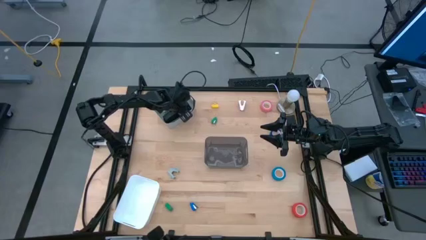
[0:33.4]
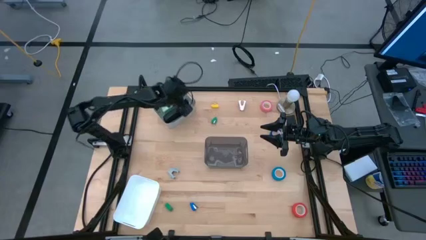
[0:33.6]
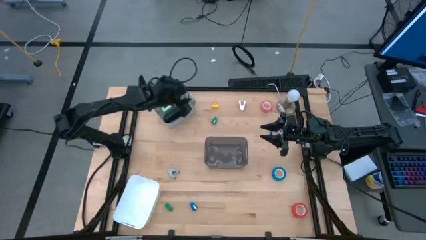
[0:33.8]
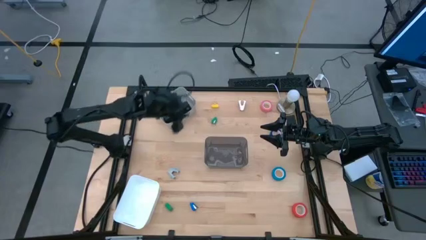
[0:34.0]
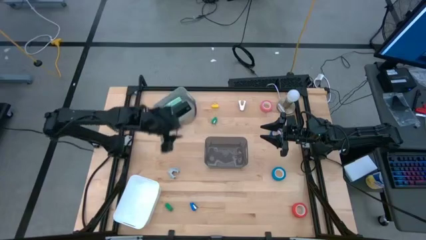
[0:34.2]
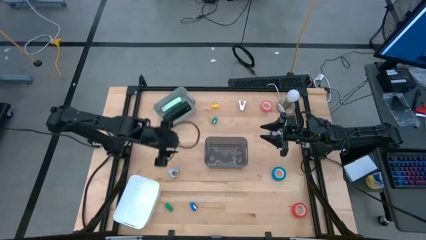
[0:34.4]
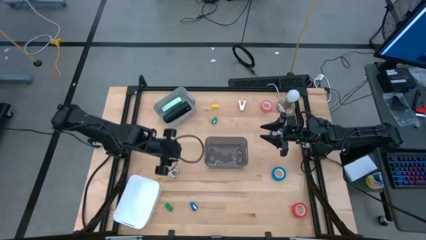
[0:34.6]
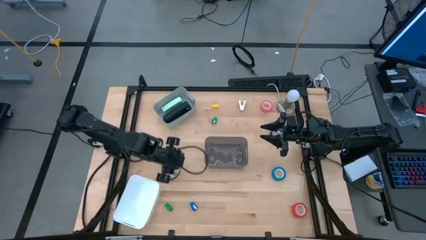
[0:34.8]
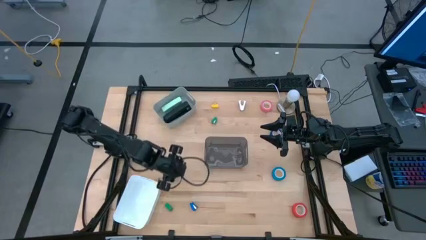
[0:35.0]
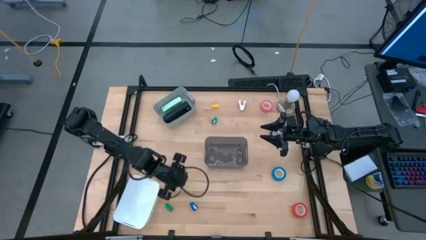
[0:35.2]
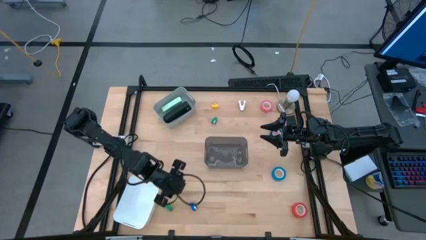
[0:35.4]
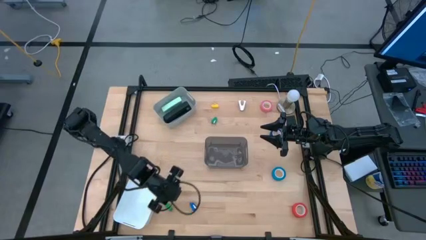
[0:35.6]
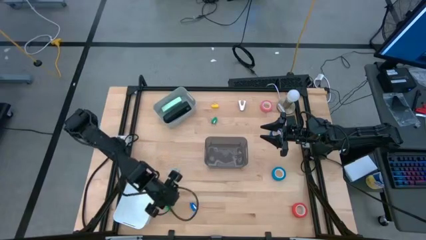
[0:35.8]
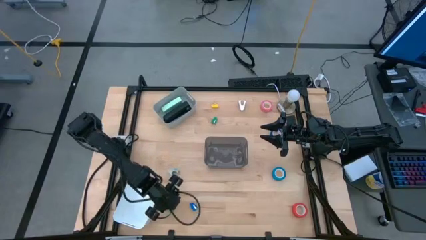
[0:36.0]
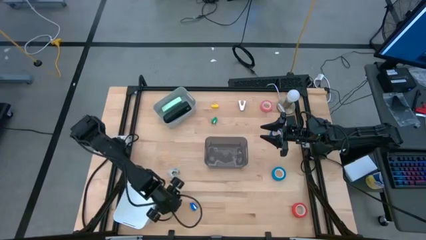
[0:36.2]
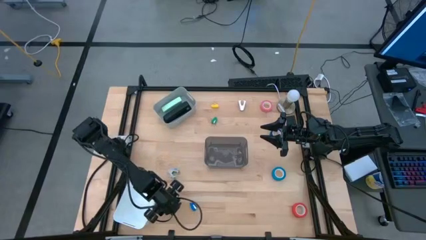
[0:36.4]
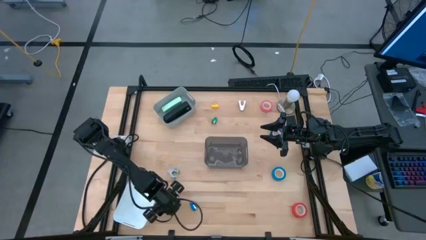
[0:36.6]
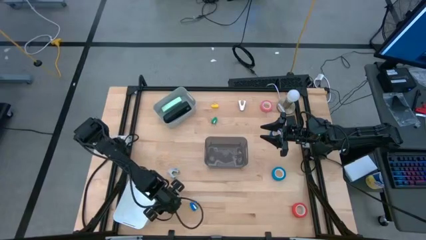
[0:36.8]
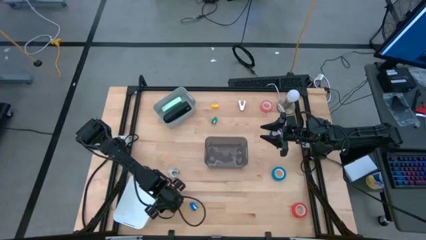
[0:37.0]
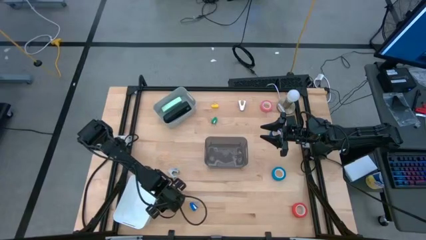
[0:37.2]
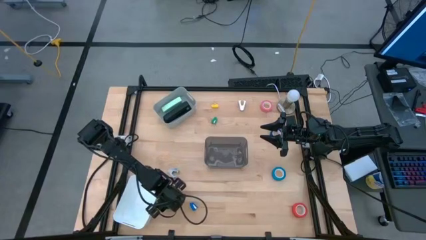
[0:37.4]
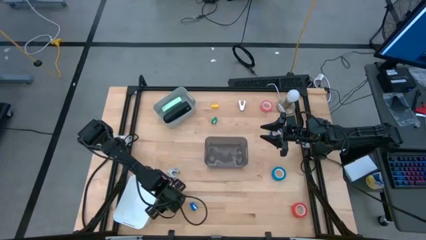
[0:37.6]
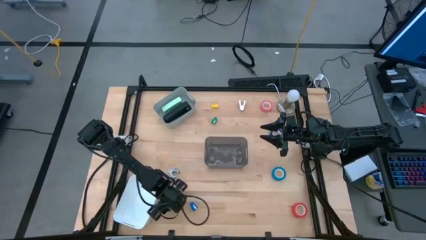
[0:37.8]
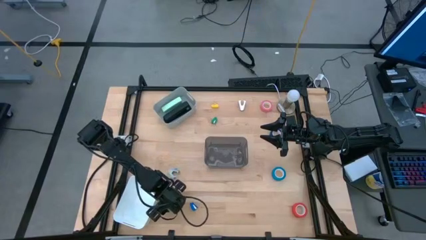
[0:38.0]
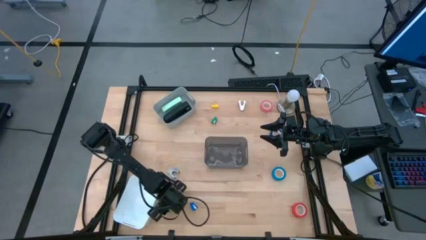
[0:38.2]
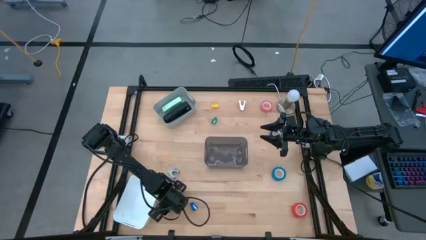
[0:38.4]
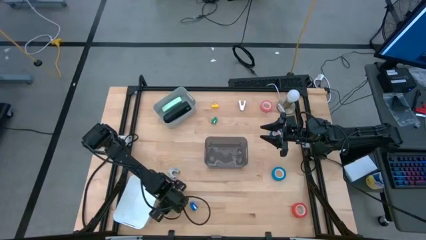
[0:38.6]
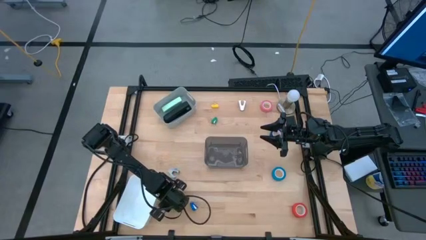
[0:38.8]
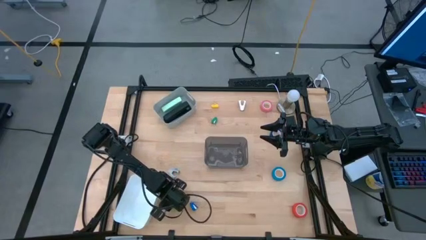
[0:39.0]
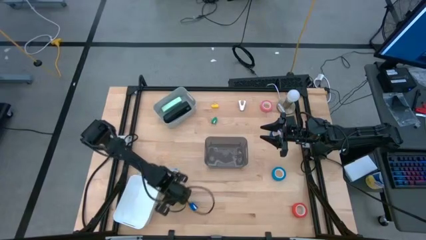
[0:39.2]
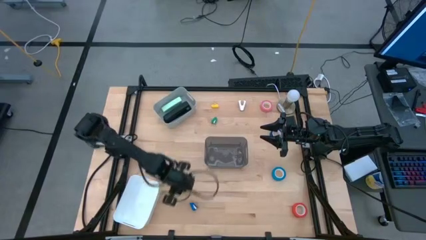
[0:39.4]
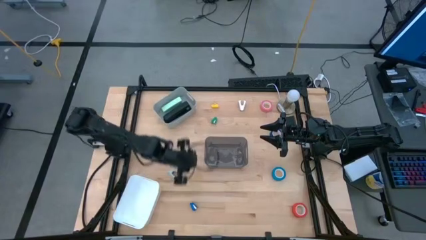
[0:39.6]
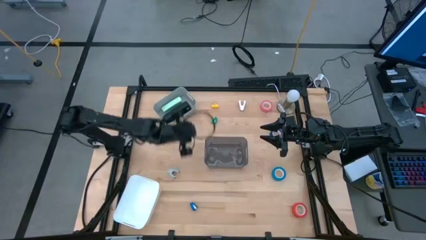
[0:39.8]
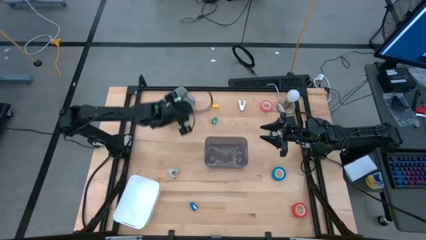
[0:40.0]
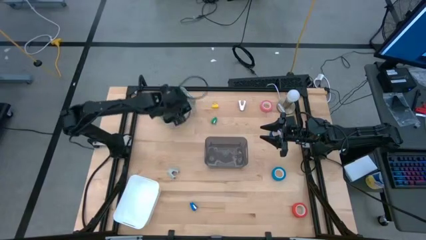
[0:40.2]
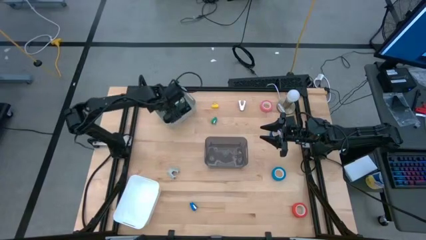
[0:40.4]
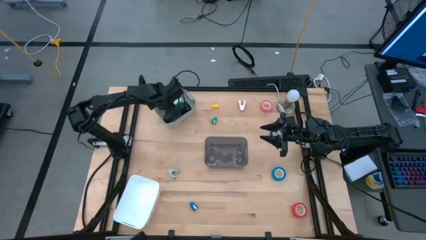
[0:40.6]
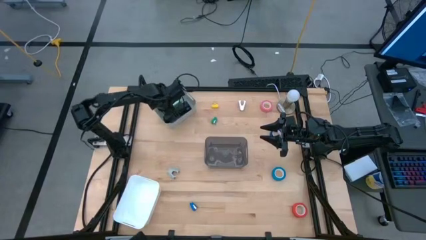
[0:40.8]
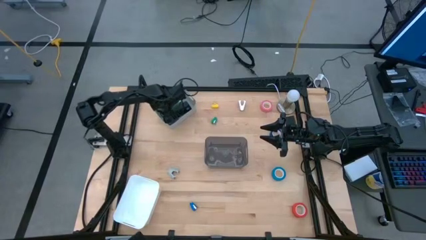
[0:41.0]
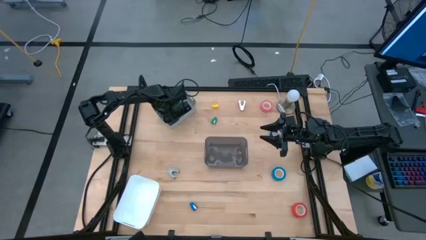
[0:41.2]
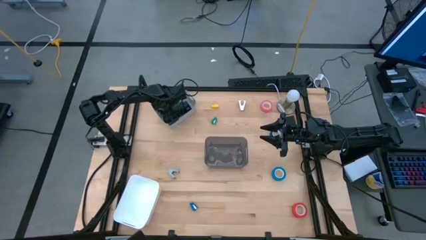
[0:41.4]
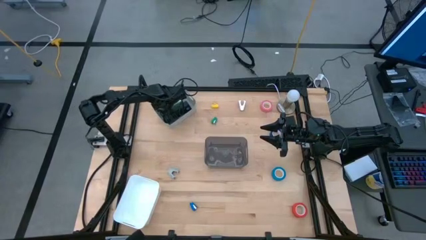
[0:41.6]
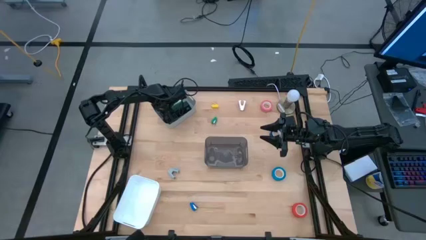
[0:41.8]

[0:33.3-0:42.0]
Task: Pick and place Stapler, Stapler remover, tape
Put the bottom green stapler into the gray bin

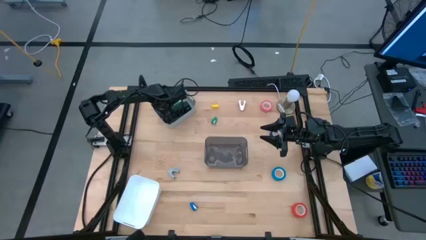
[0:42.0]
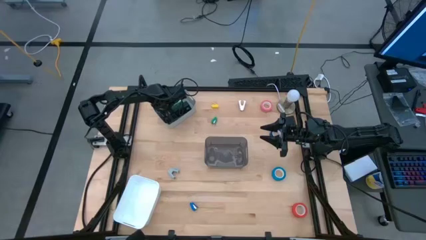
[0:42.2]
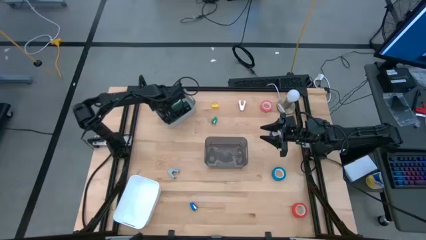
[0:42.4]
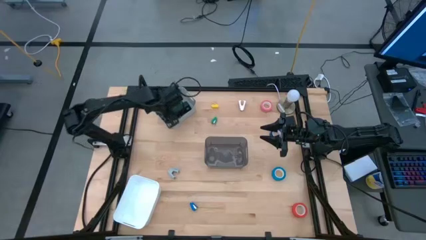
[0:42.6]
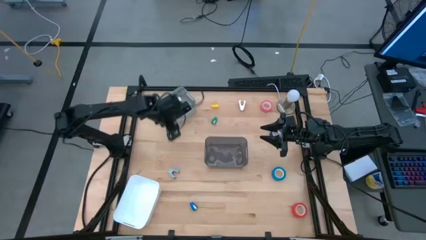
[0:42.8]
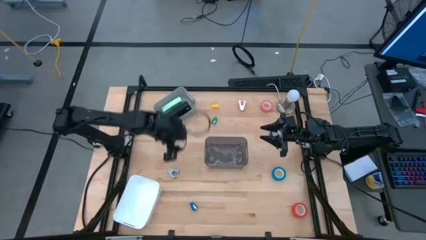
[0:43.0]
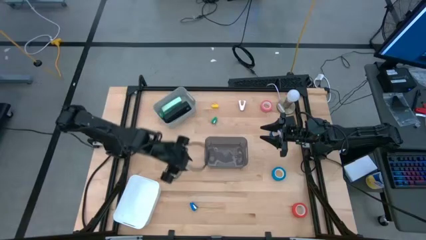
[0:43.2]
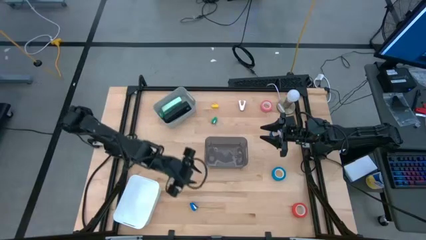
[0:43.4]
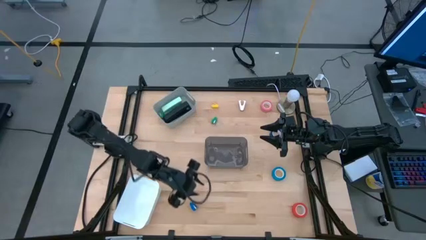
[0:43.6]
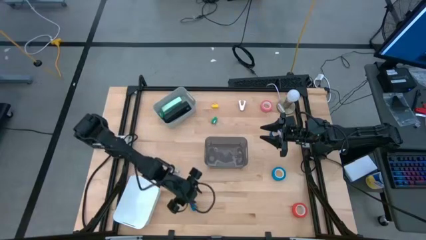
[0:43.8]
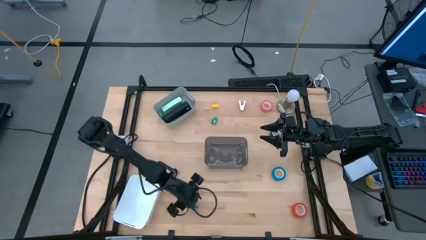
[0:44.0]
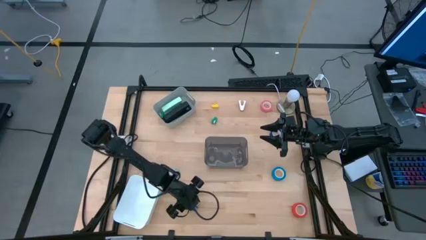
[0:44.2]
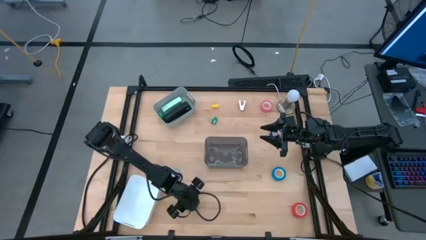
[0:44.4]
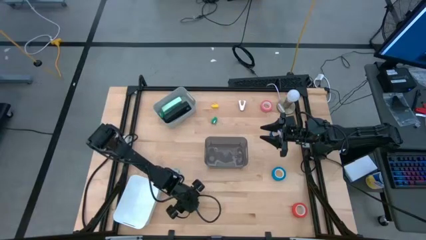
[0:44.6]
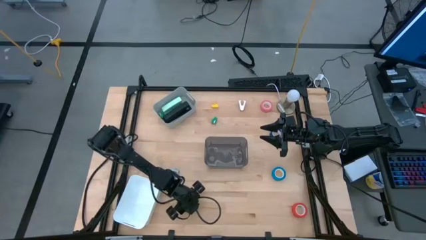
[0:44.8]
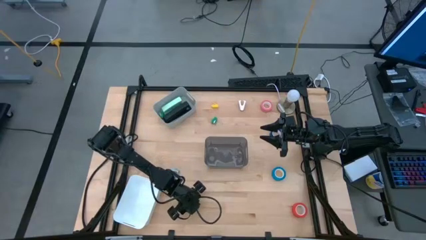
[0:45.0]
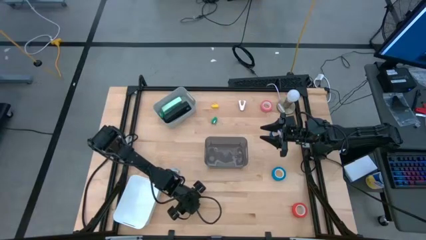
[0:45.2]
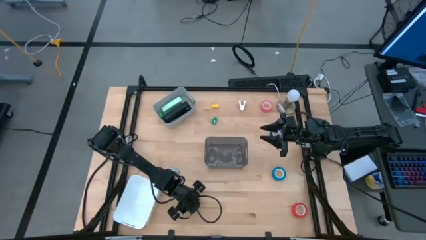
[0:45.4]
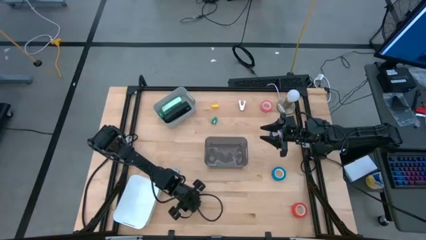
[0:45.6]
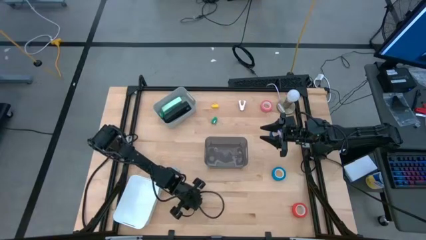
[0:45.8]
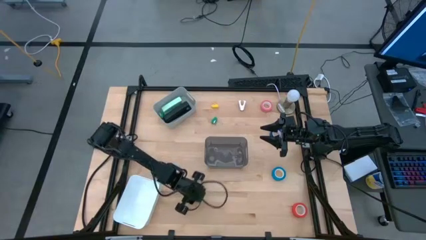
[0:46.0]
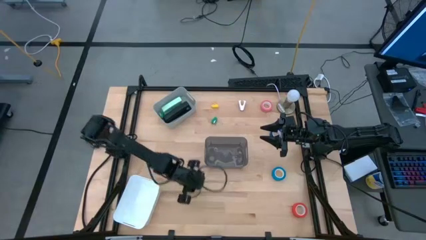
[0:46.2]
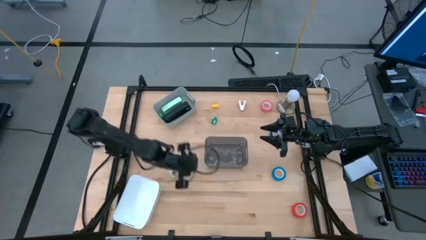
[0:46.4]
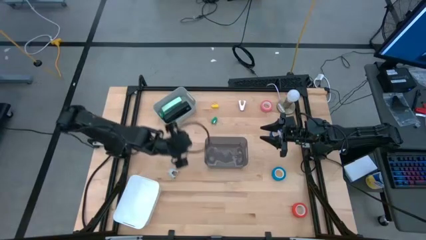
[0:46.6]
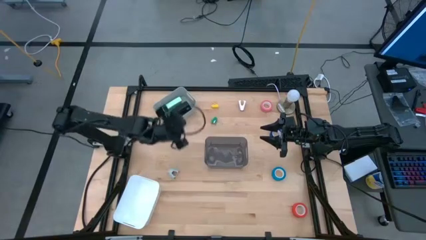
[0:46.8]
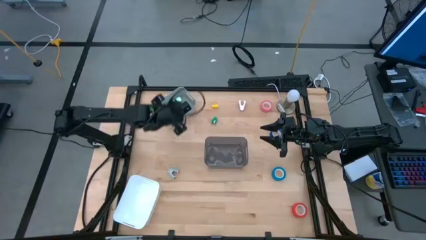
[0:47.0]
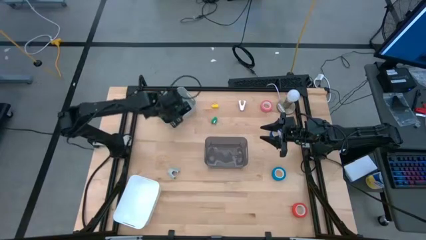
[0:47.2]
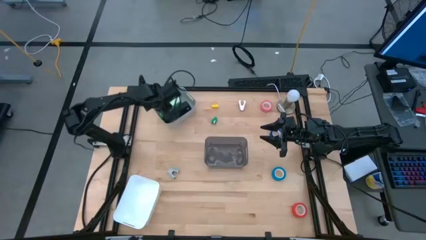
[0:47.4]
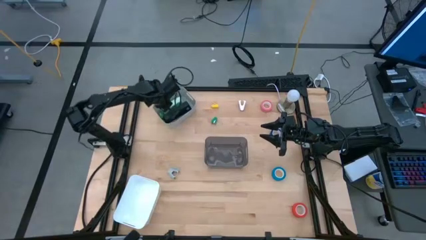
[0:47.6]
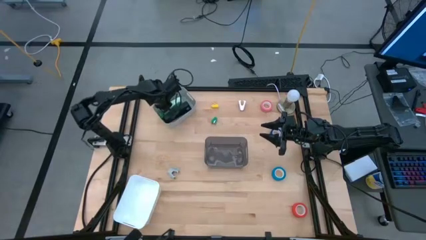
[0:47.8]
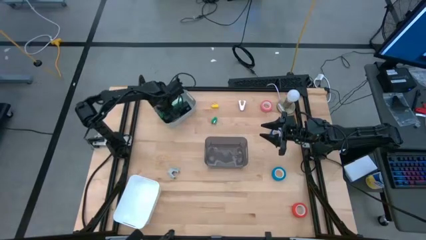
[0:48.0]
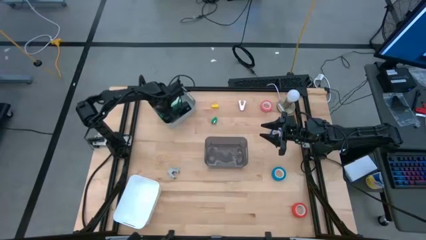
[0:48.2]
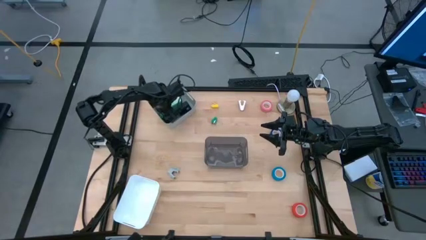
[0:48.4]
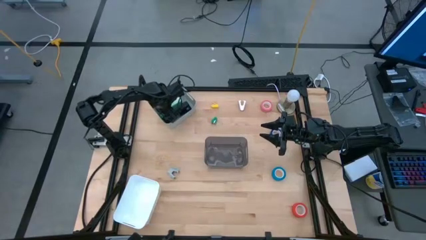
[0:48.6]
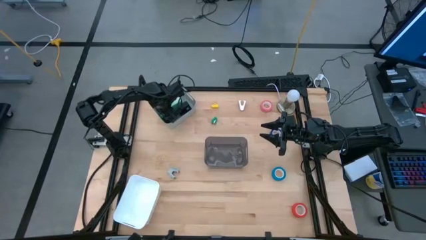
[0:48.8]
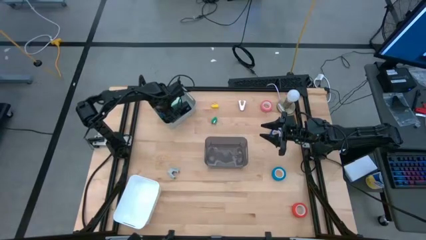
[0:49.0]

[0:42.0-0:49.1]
Put the blue stapler into the gray bin
